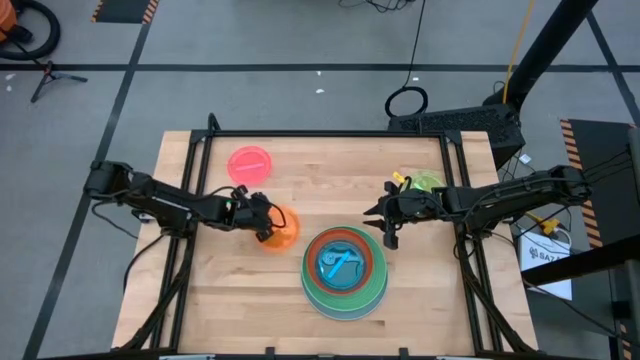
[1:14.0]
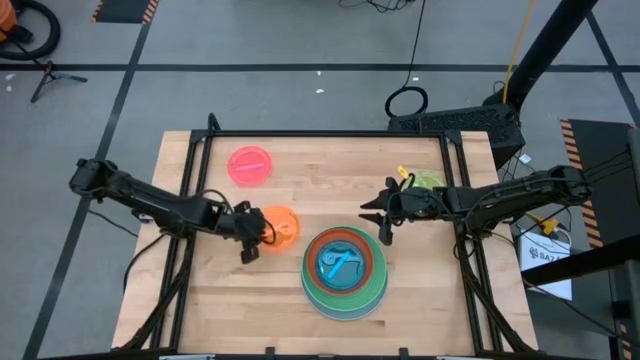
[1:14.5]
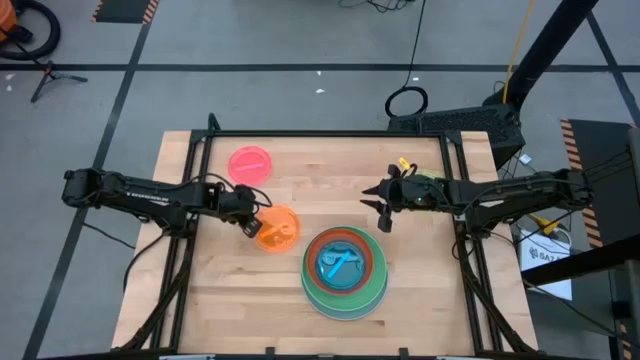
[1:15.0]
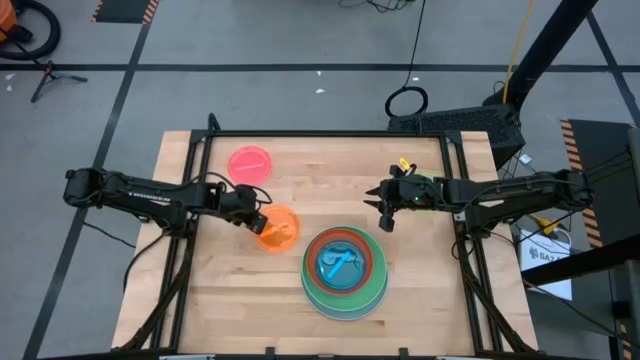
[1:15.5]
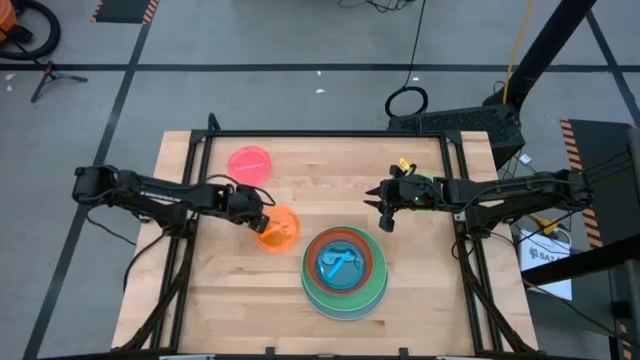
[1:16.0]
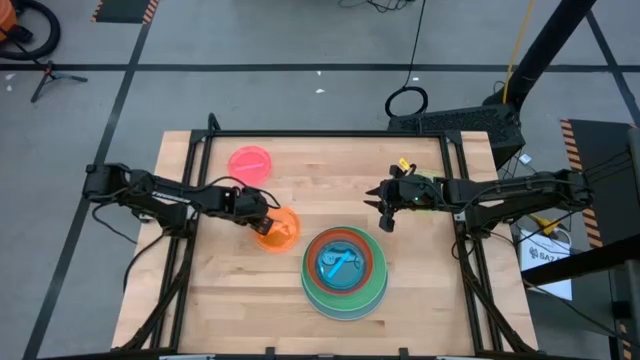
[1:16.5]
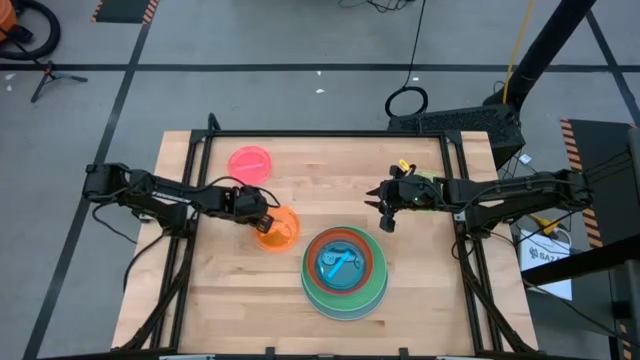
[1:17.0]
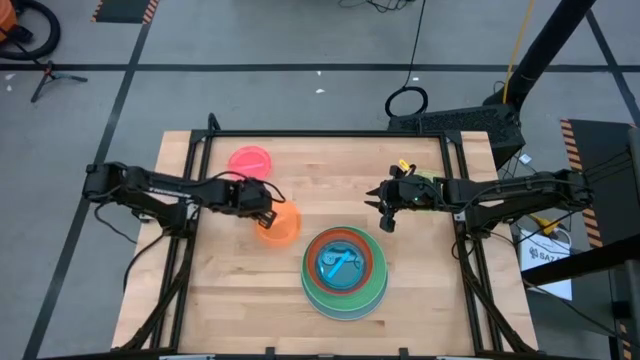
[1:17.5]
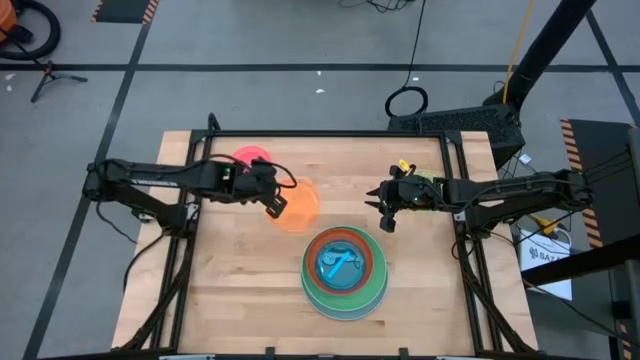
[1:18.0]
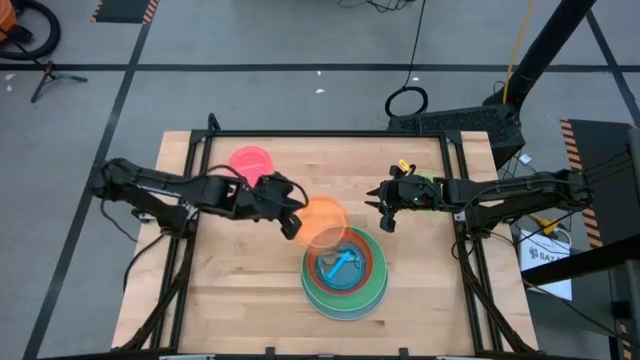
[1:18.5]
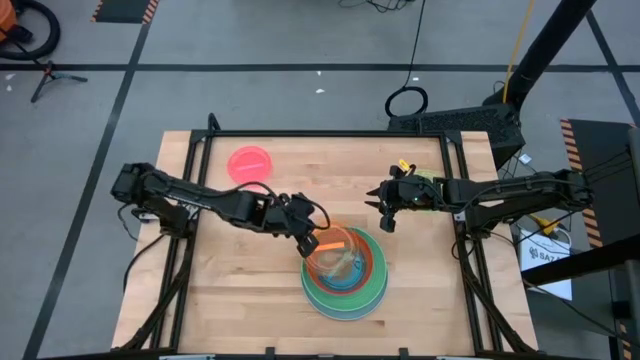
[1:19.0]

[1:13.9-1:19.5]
Task: Stack plastic plates
Stack the orange plate on top of the blue plate

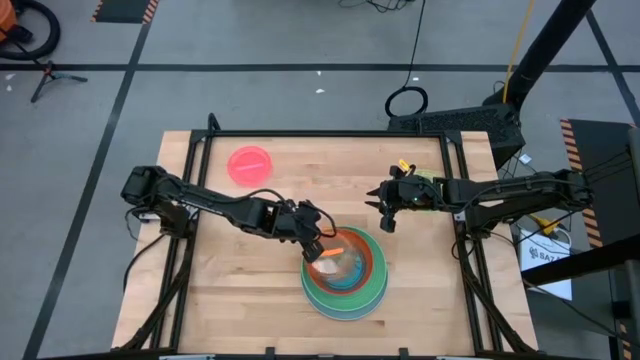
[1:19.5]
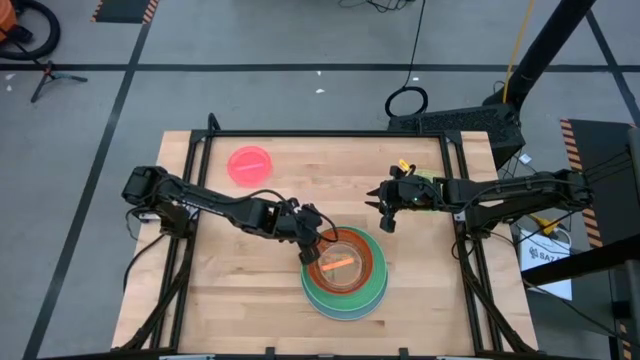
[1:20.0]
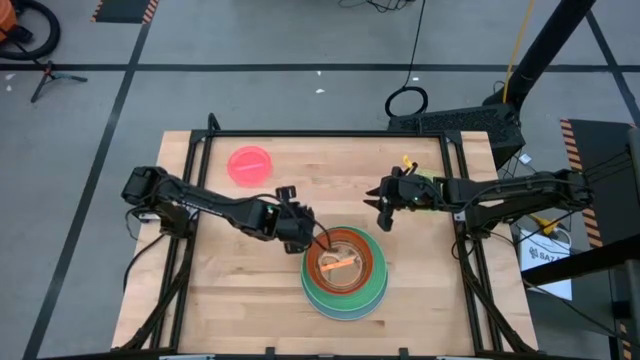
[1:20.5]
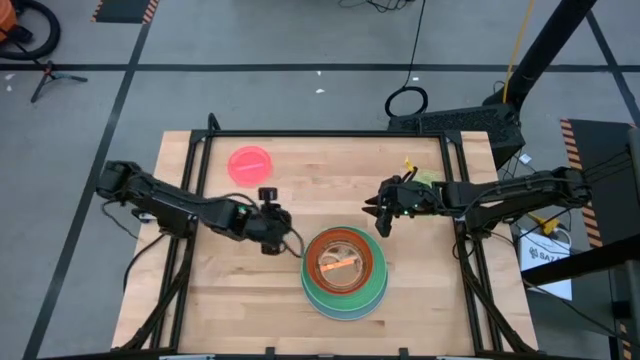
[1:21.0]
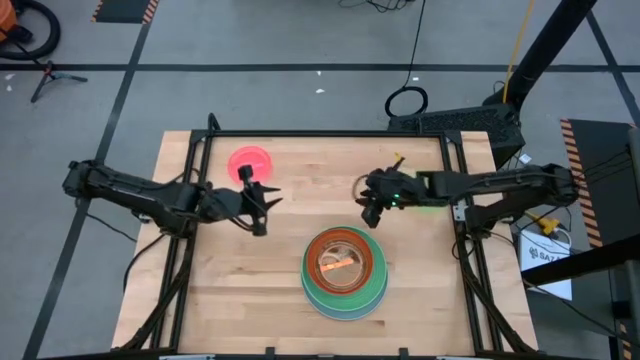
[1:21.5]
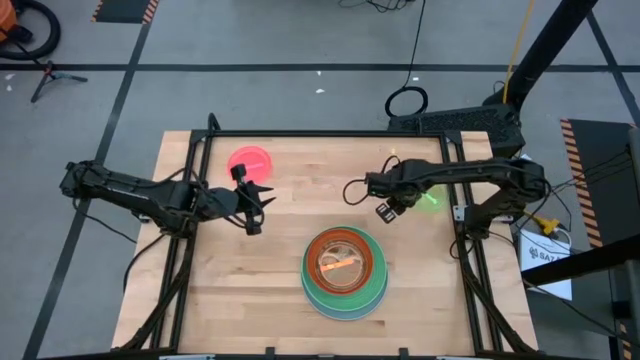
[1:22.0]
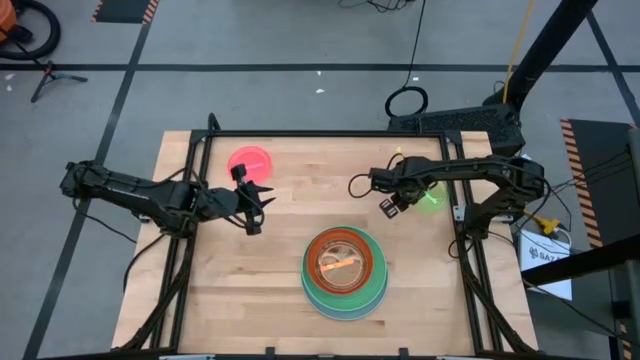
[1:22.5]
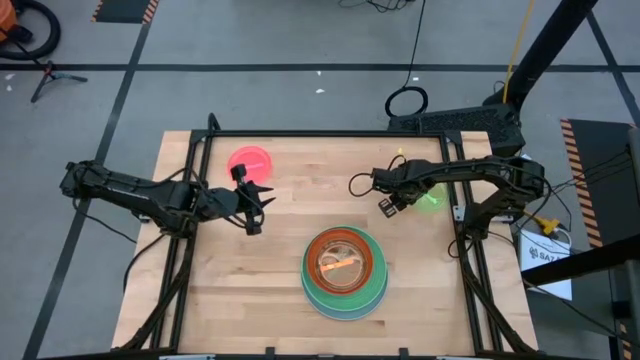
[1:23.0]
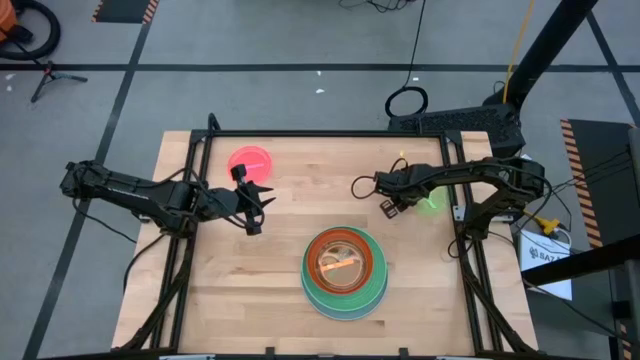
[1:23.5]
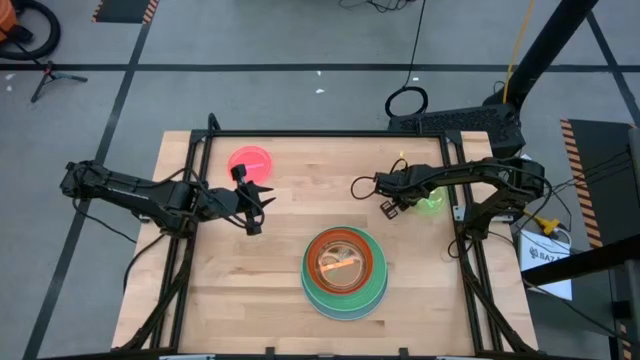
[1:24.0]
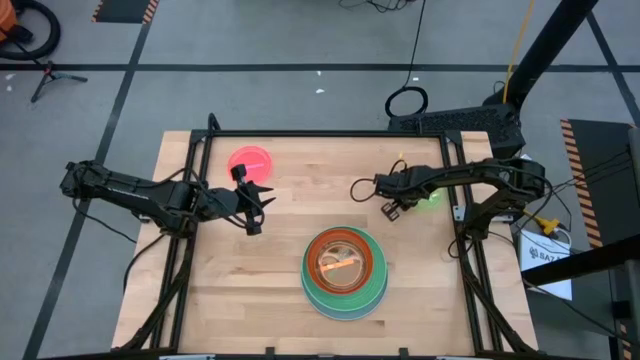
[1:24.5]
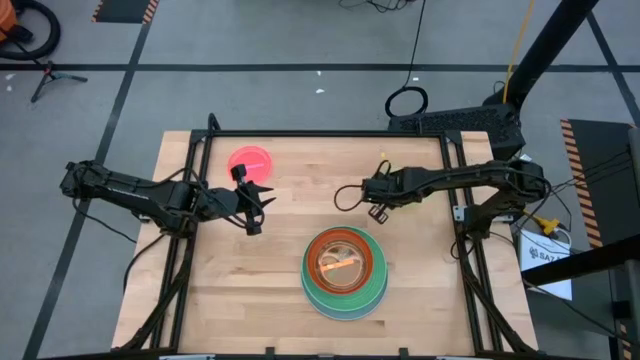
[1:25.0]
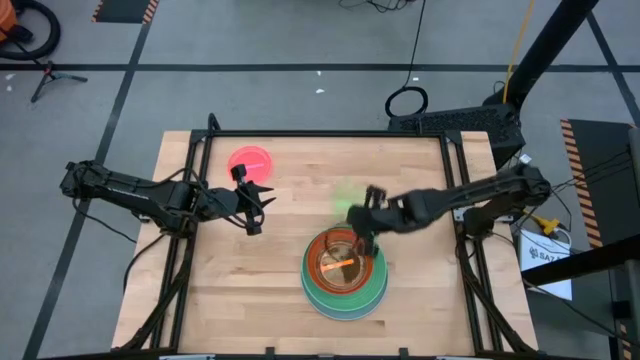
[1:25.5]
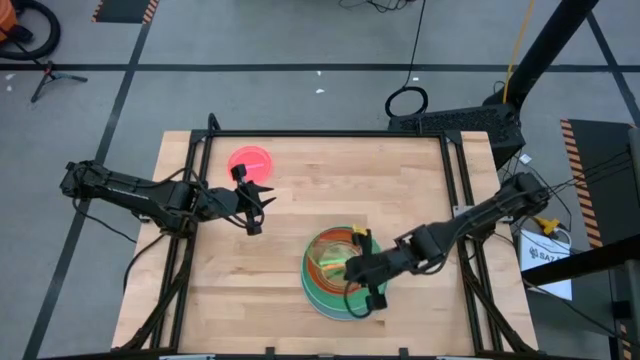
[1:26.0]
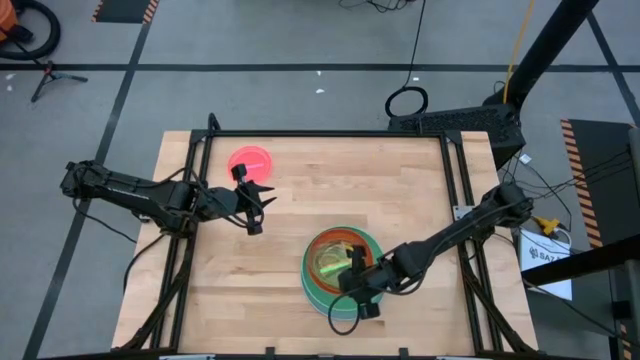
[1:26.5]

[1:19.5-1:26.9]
Stack the green plate on top of the orange plate

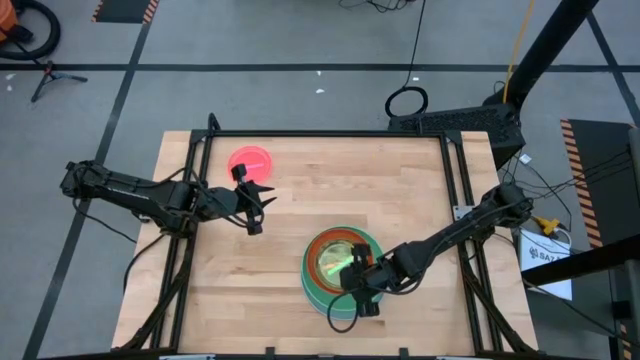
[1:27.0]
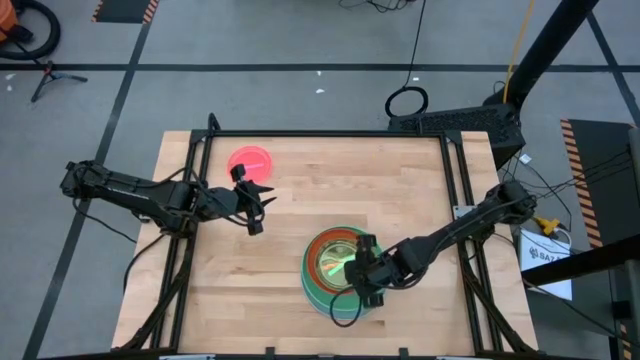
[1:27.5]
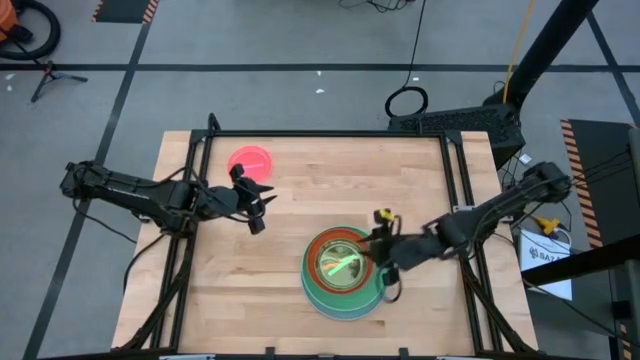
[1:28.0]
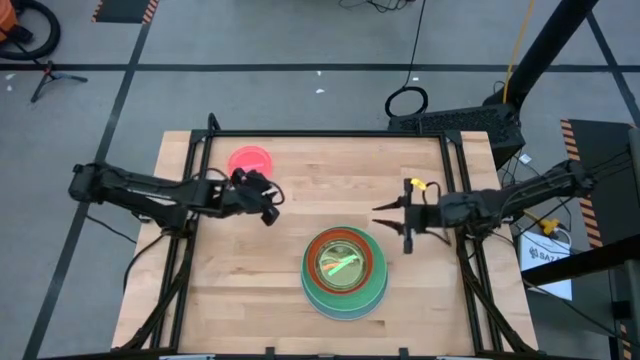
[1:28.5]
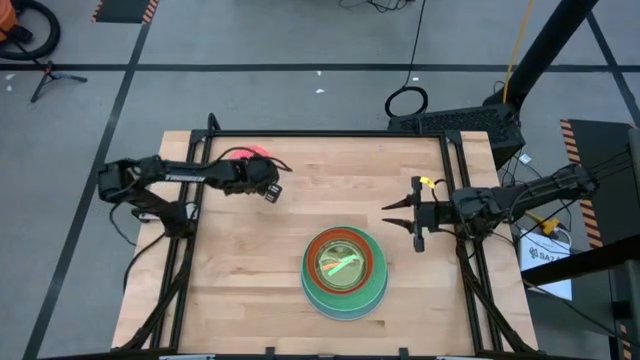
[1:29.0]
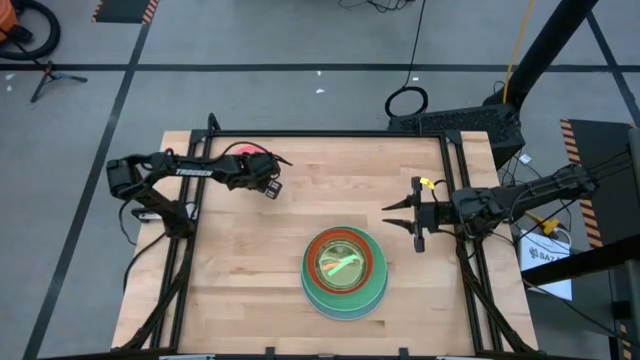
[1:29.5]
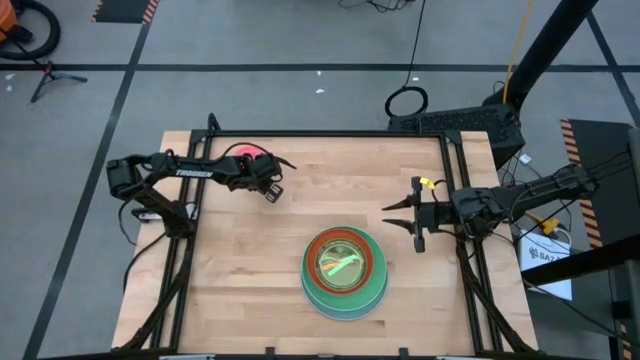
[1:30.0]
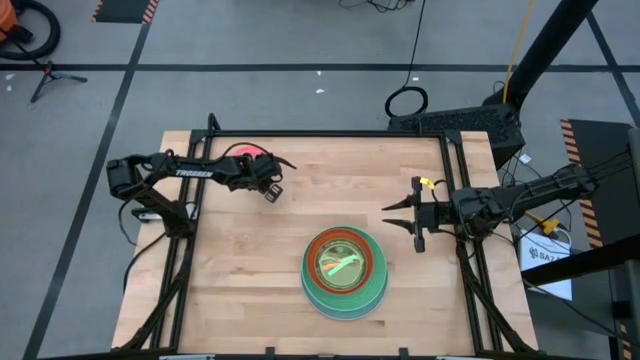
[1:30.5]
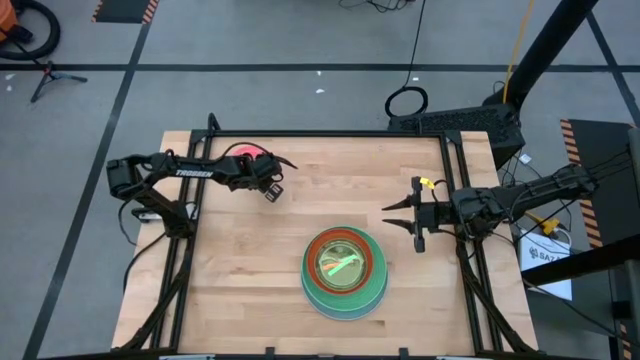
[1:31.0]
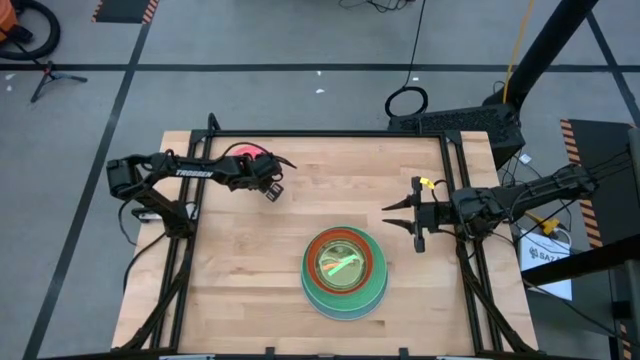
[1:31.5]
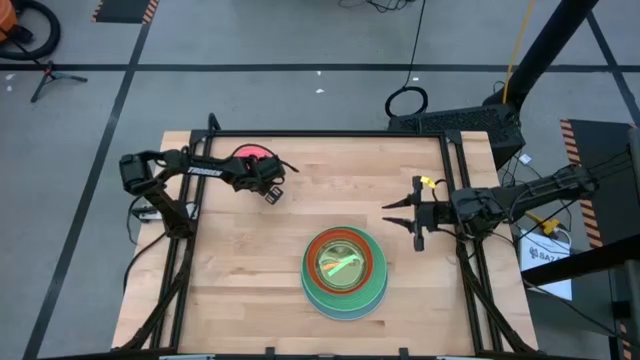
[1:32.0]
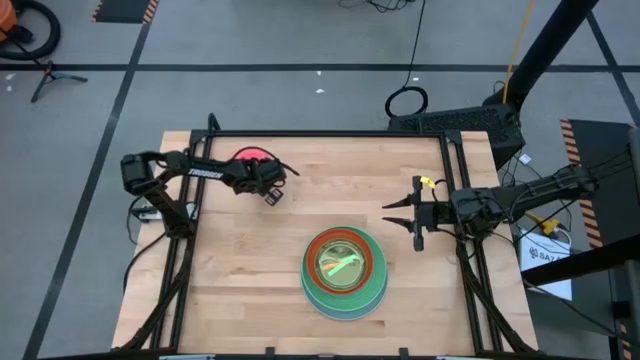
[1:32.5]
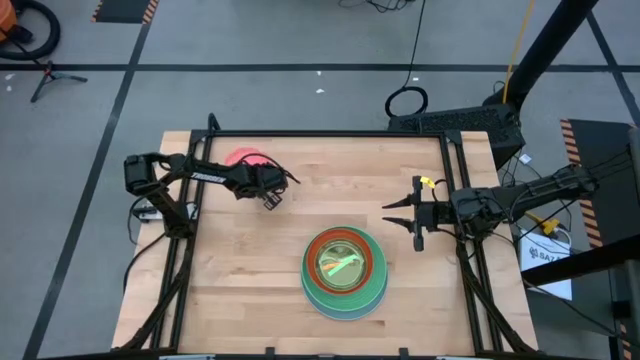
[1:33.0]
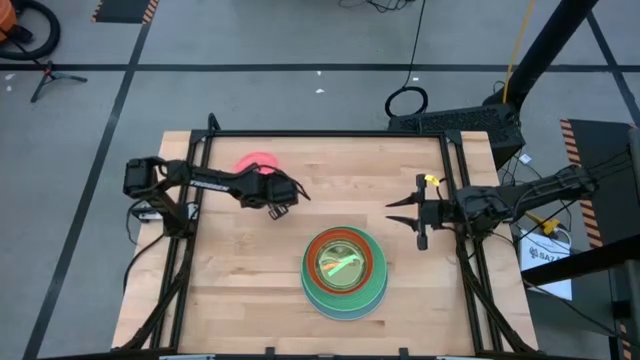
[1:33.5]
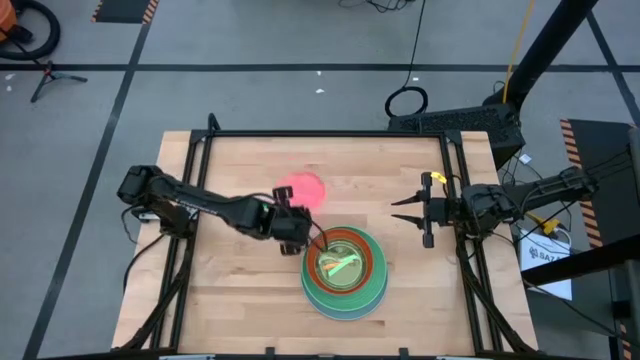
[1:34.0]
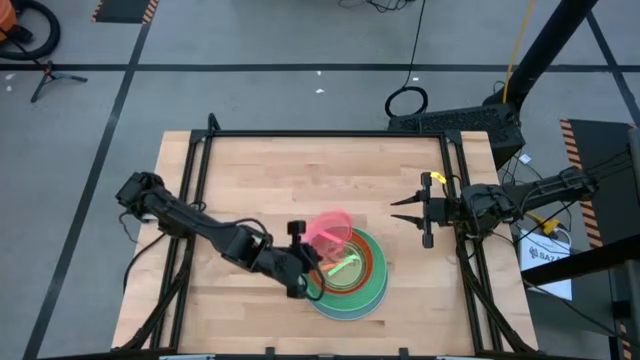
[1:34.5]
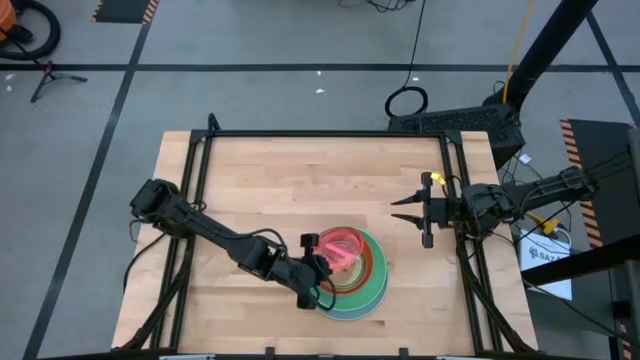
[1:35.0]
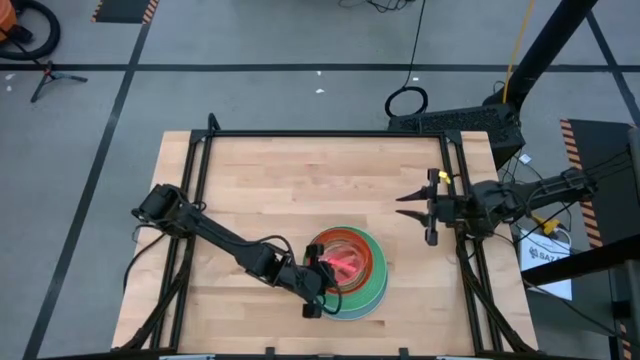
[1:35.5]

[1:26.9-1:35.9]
Stack the pink plate on top of the green plate

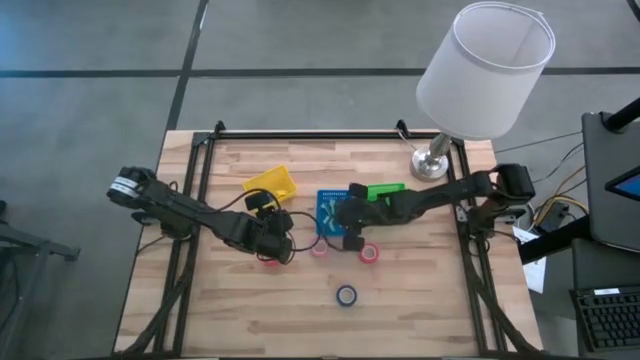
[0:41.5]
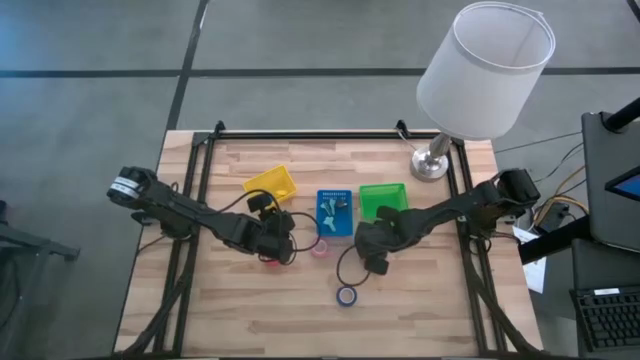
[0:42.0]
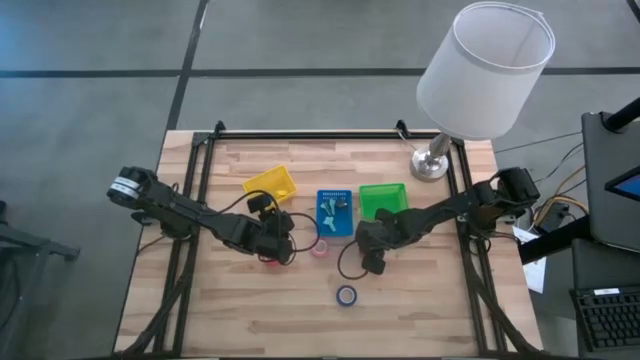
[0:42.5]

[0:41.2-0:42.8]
Task: Pick and place Stapler, Stapler remover, tape
Put the red tape into the green basket
